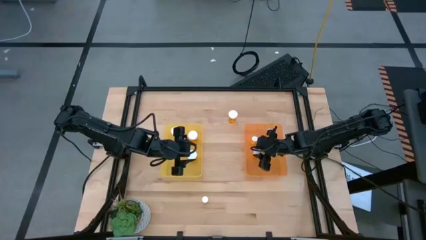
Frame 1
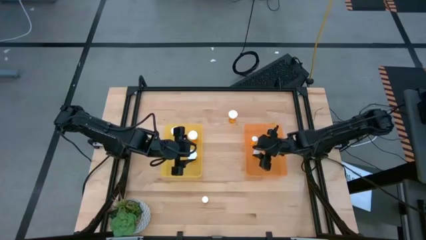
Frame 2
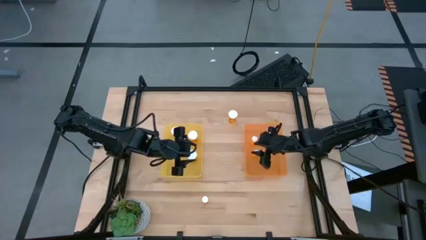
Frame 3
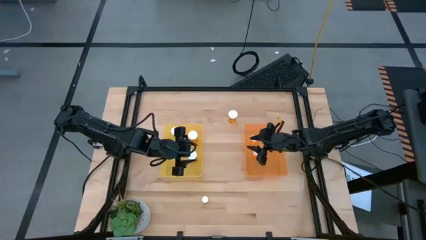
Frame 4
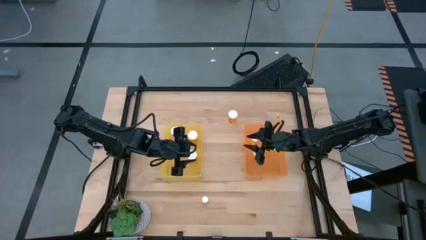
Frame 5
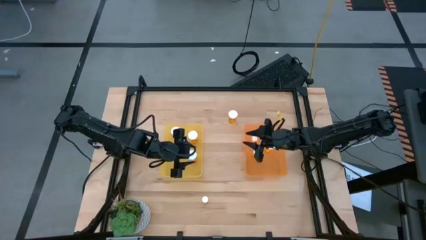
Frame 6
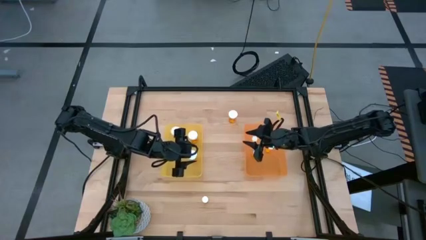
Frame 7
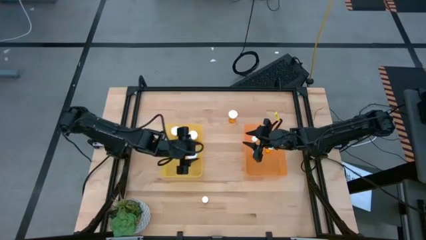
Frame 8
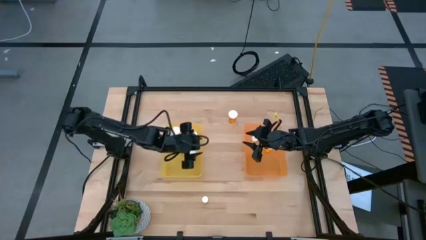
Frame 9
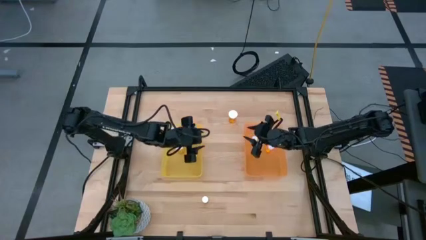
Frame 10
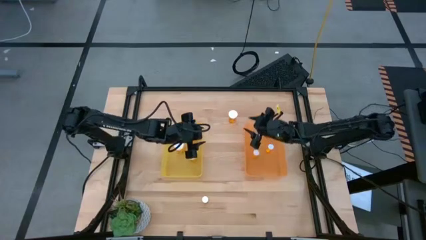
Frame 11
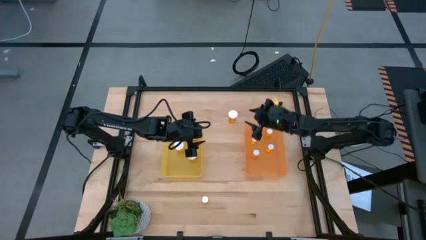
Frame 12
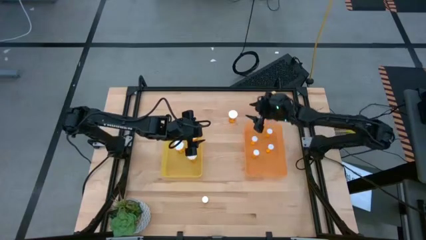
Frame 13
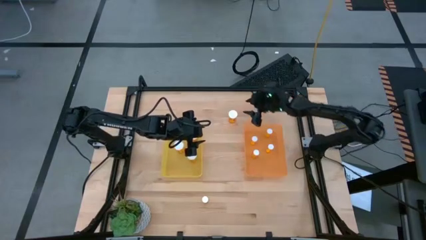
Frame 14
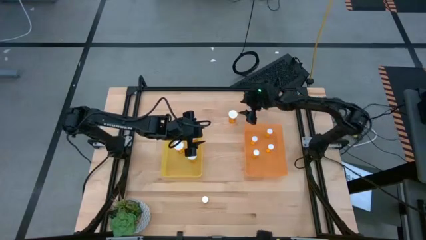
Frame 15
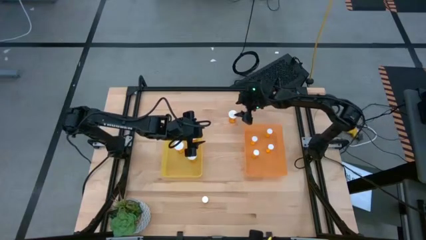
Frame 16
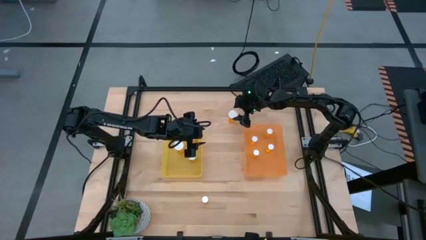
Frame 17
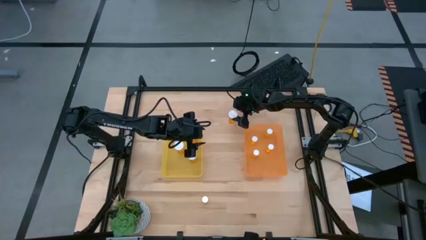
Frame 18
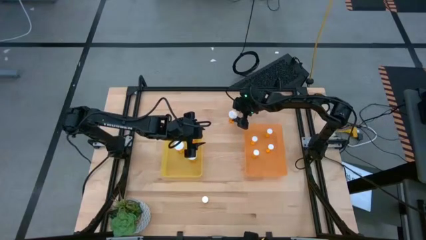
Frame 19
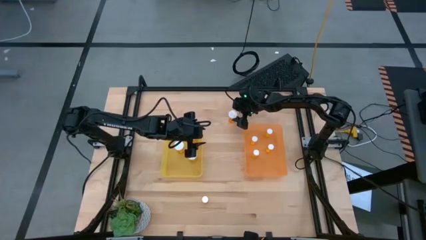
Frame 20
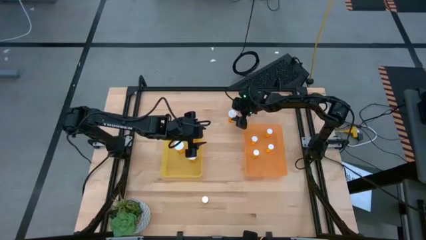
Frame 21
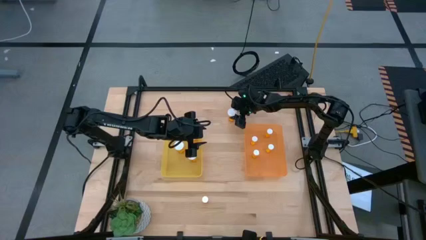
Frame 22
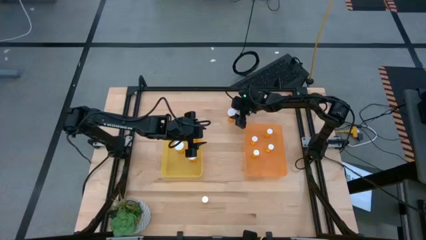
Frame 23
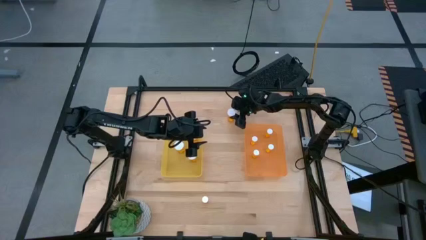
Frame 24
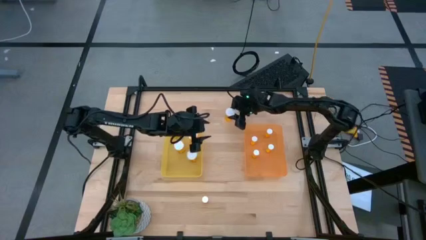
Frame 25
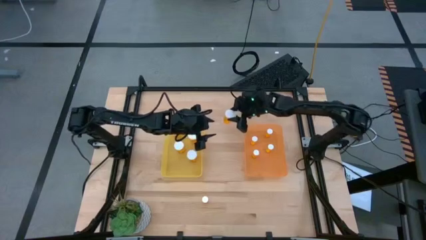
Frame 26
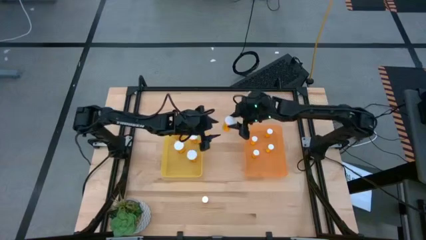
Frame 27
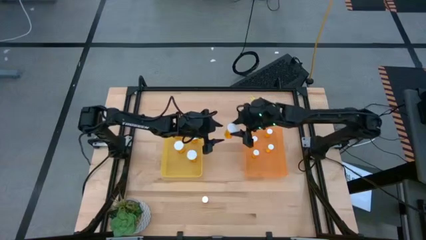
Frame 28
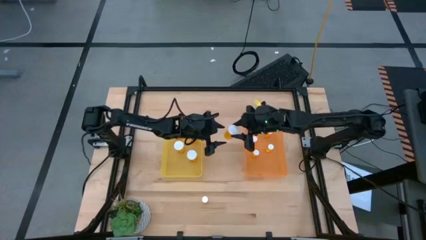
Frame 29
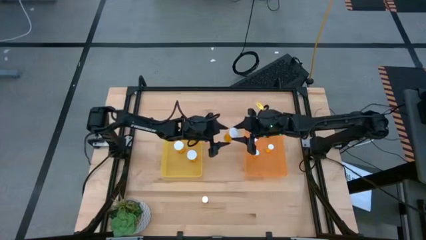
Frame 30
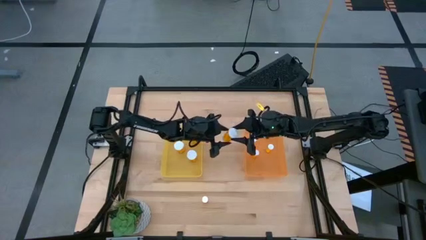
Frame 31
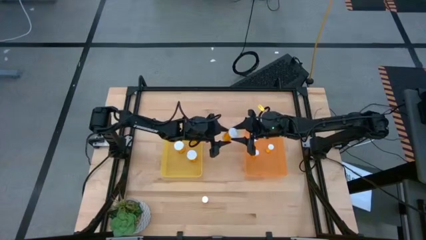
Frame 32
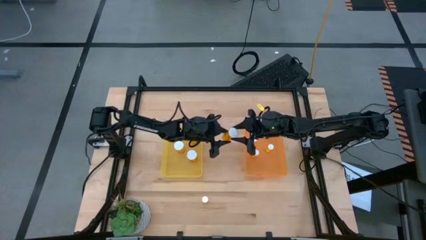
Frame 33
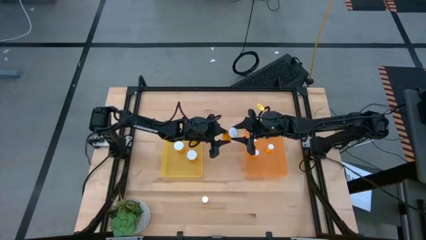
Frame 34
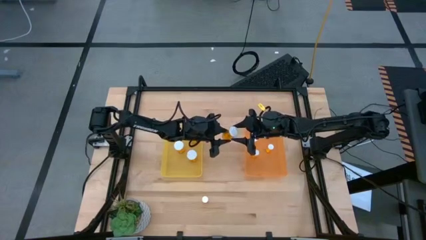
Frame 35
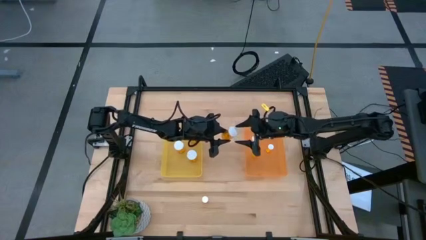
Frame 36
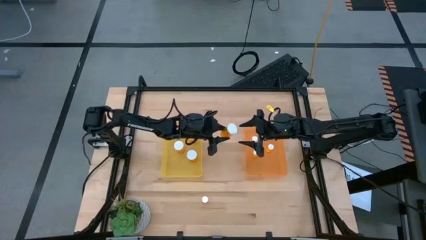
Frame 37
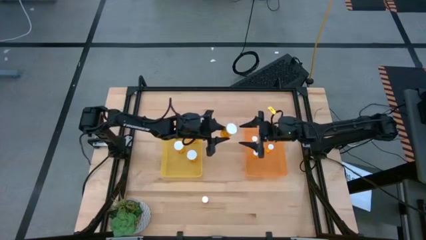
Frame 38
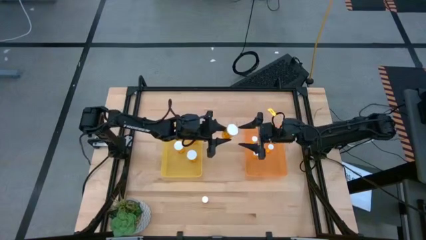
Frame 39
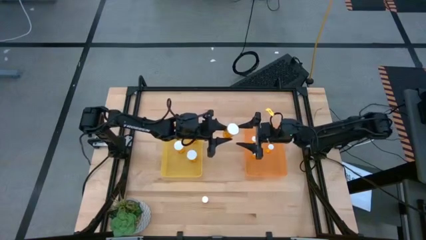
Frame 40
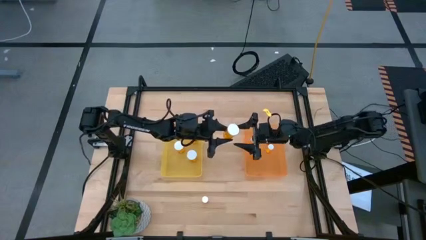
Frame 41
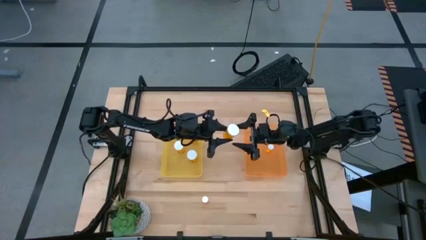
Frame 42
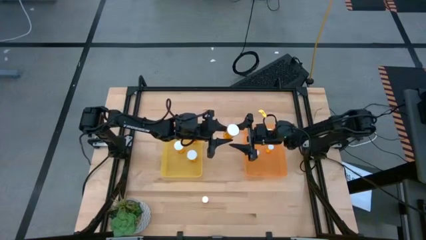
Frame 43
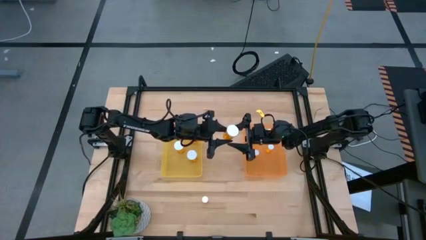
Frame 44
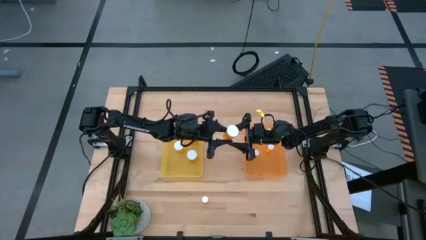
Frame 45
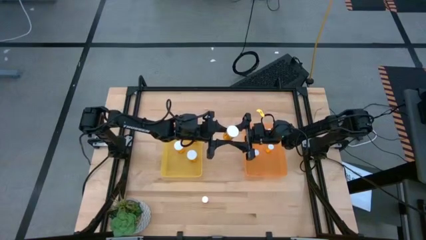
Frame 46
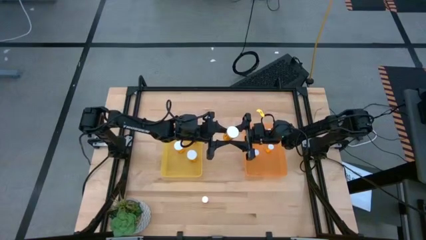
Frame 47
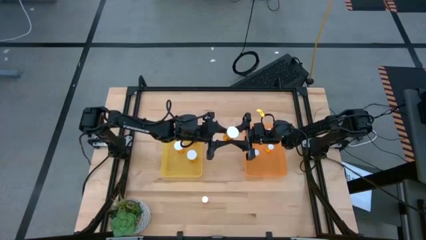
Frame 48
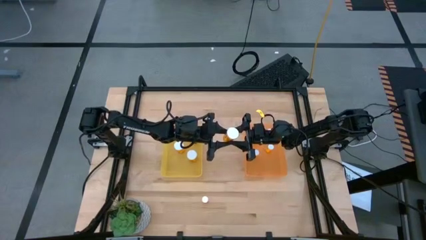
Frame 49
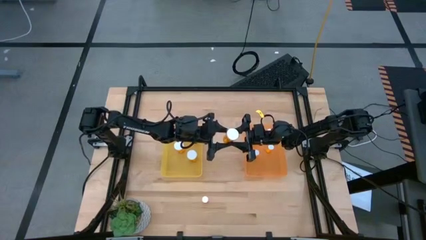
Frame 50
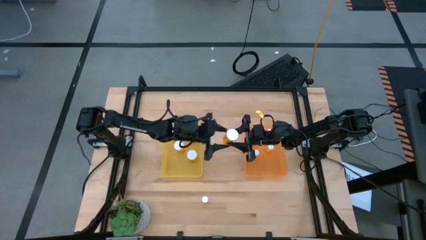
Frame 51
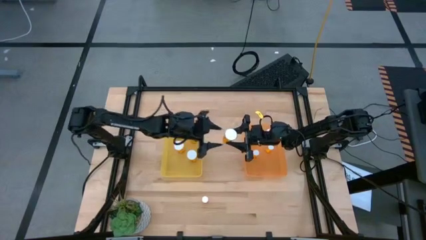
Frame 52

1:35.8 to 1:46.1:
Task: Pick and place medicine bottles into bin by pill shape (circle, oval)
Put the large orange pill bottle into the yellow bin
